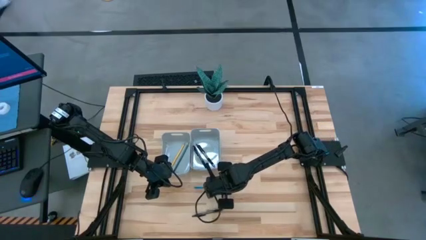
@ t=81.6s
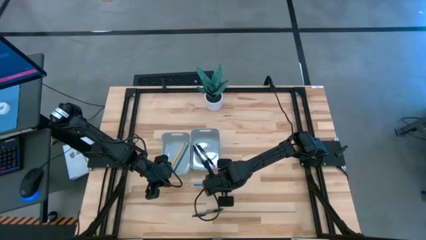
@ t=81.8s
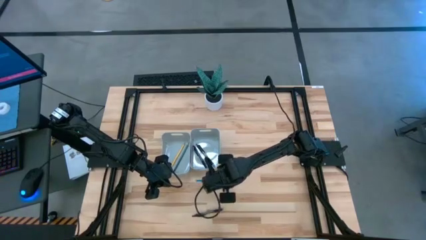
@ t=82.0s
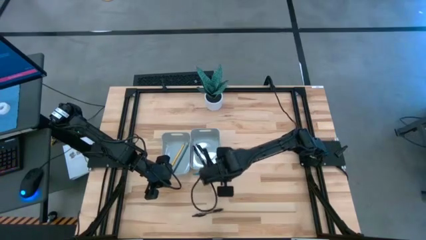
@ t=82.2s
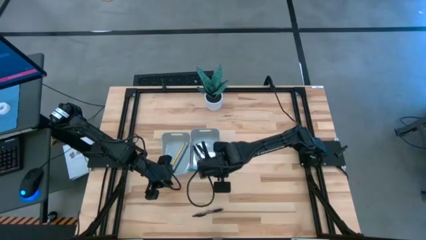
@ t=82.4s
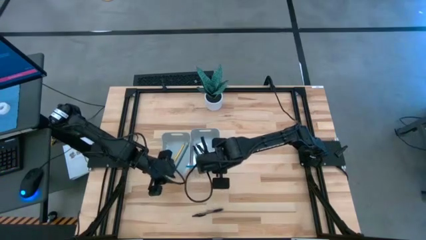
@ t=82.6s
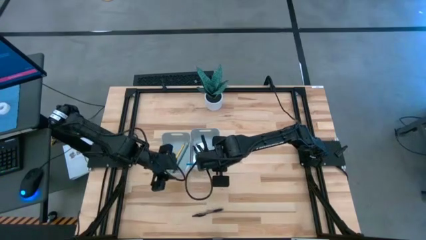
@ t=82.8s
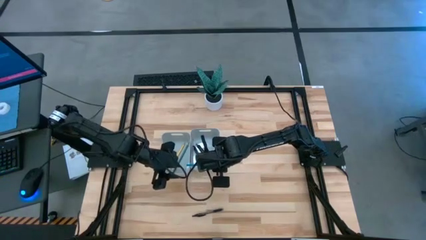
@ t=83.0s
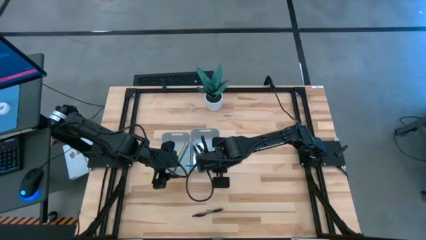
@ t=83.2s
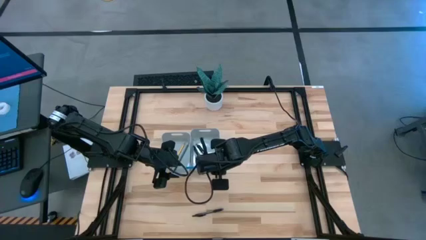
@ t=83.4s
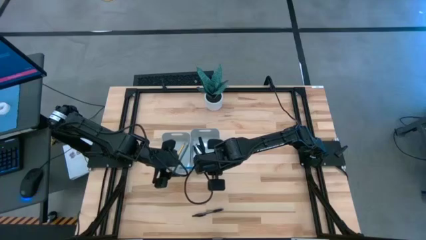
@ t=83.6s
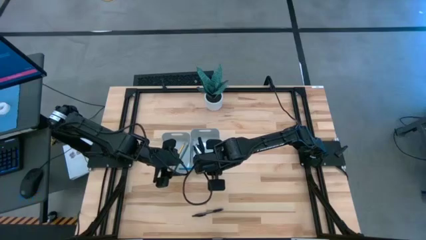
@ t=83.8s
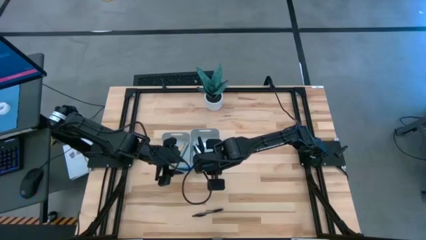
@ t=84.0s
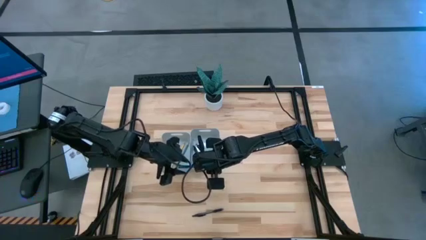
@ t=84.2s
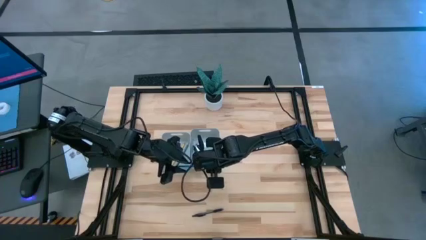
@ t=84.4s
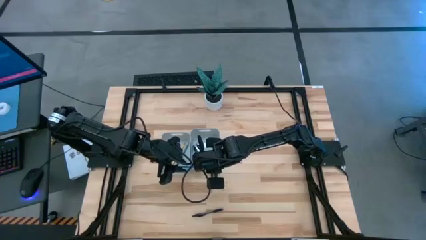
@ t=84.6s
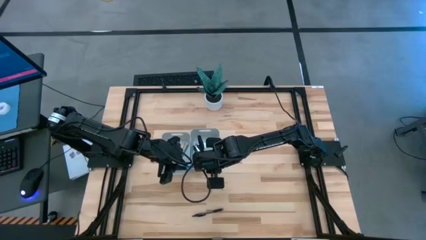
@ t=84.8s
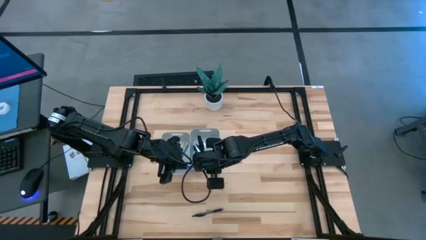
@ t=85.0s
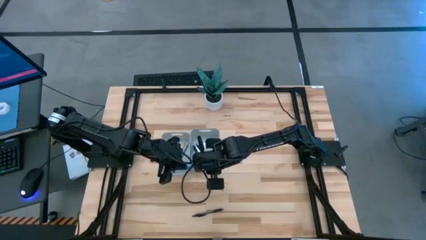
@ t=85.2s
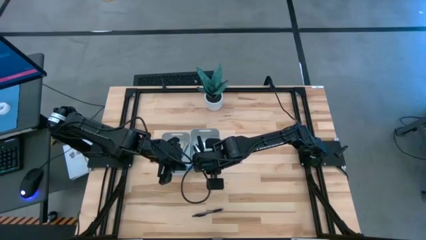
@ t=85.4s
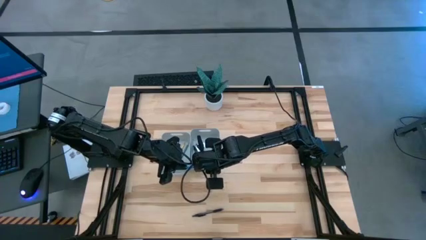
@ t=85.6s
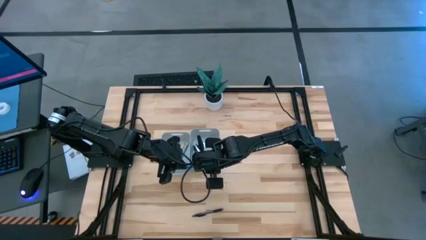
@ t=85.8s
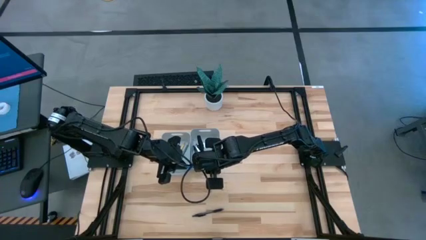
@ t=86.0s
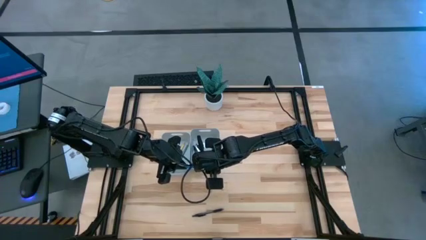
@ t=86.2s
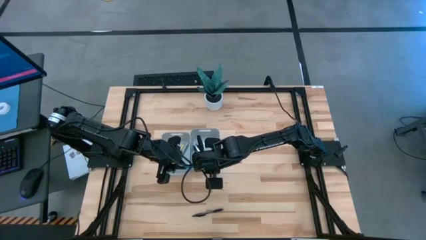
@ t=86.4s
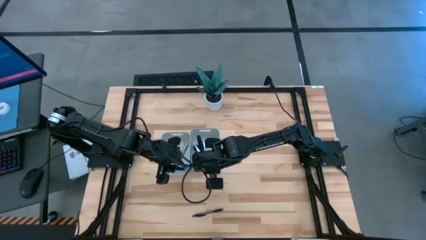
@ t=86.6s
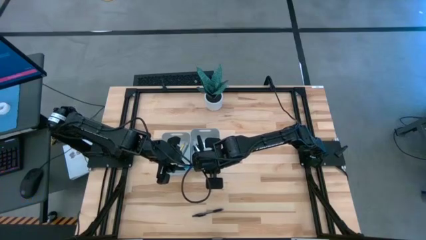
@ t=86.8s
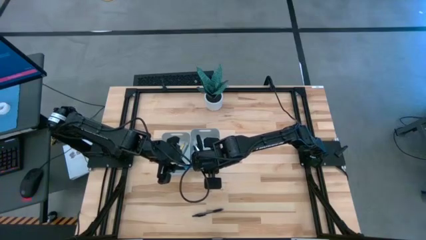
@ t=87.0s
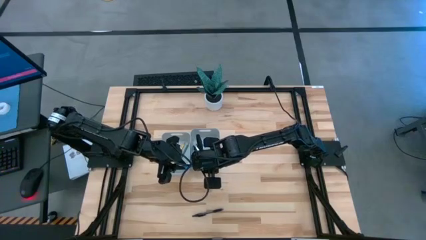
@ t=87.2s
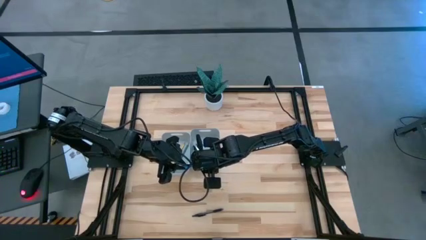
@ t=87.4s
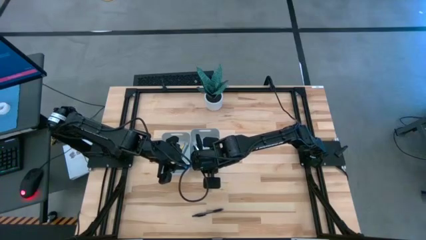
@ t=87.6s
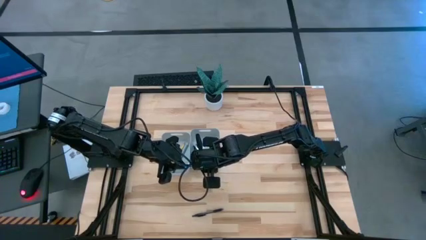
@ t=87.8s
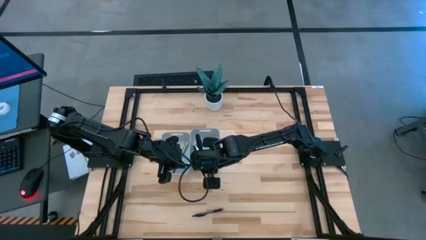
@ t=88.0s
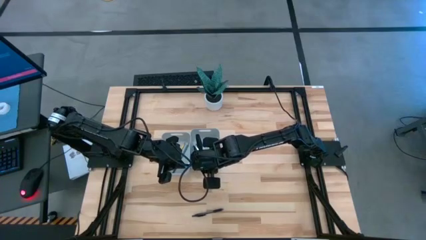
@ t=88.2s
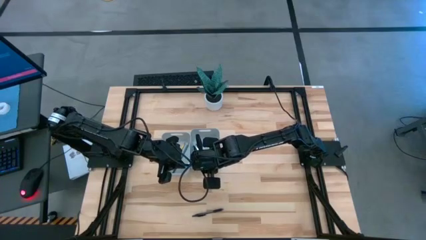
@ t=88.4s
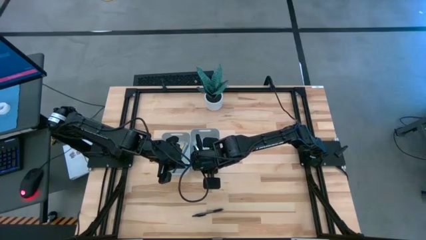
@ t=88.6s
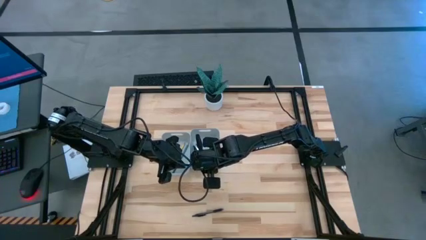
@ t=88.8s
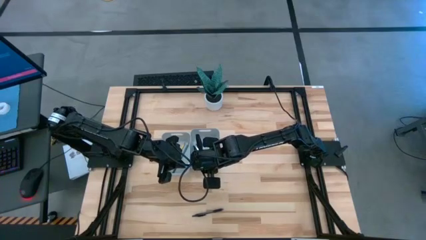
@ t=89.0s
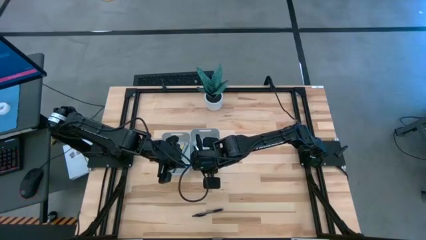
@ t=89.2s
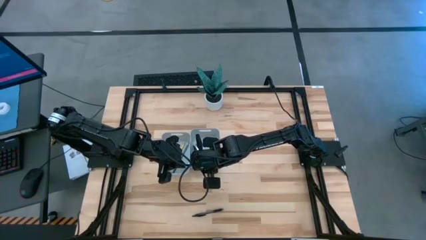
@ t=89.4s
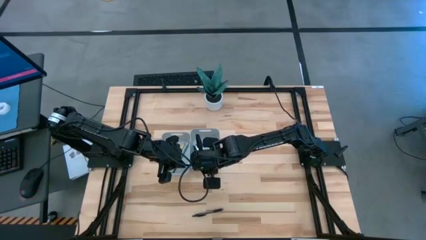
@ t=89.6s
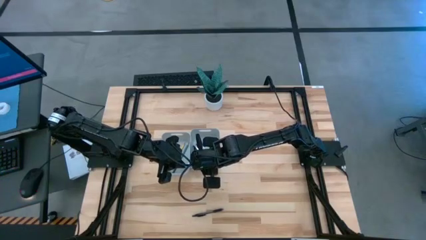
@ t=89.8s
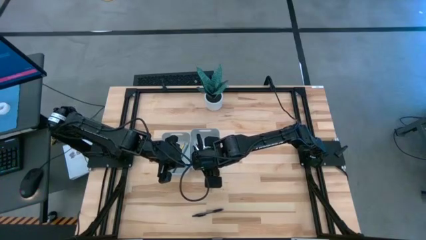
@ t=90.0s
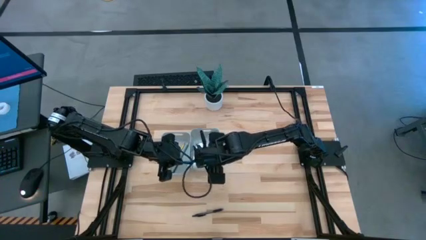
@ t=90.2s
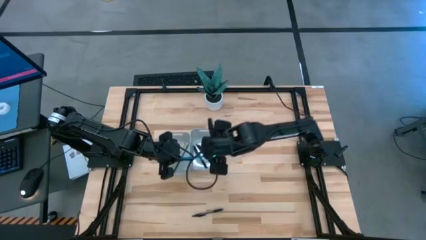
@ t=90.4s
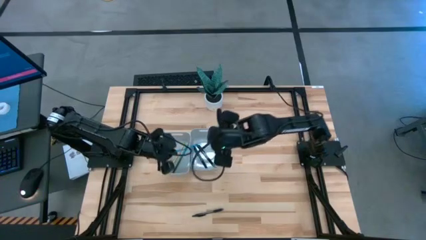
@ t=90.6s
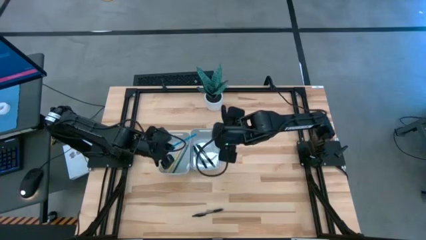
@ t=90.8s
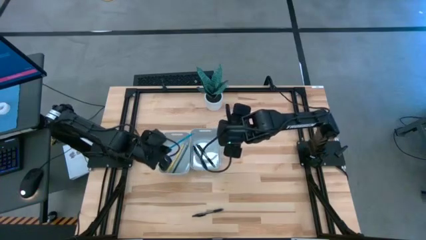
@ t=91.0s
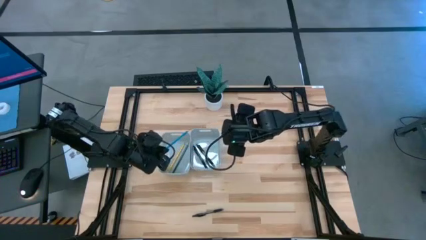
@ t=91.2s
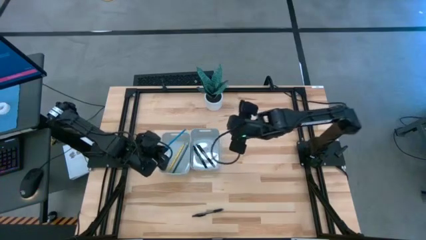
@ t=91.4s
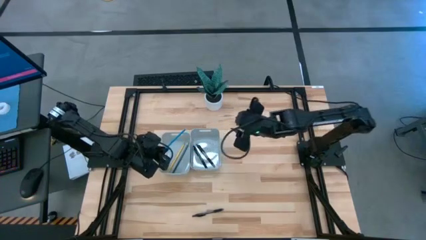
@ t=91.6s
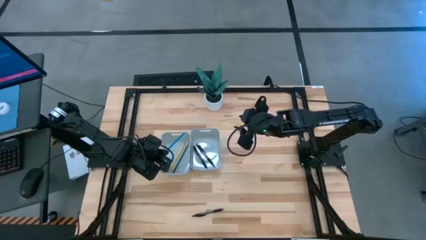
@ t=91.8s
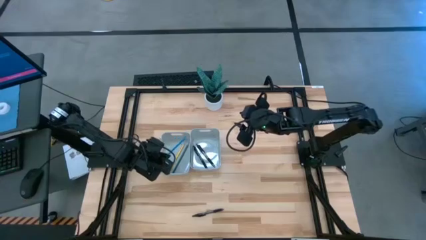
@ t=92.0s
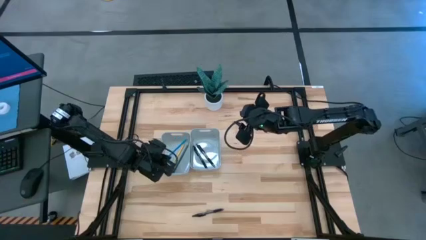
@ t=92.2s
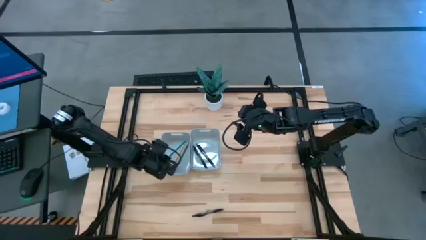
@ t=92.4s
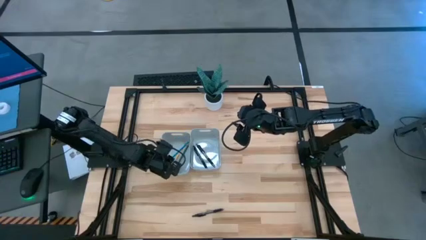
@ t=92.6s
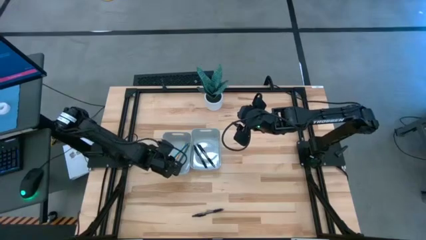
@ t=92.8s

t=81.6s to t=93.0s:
Task: Sort pens & pencils
Put the blue pencil into the left gray bin

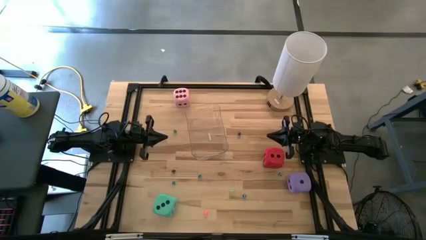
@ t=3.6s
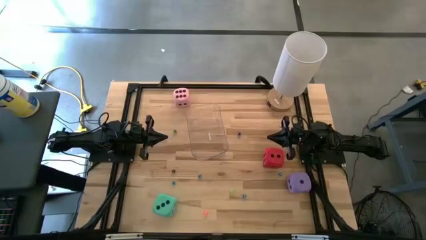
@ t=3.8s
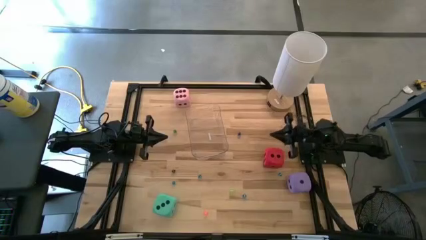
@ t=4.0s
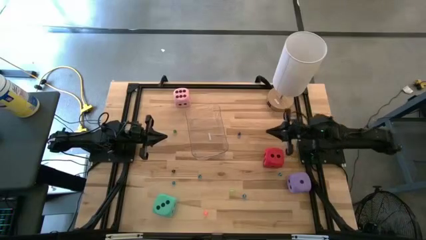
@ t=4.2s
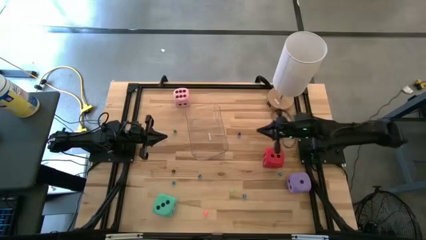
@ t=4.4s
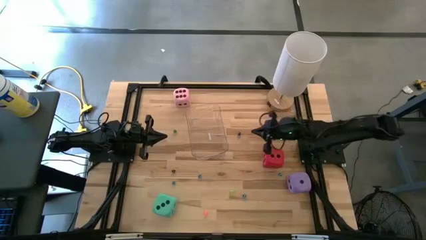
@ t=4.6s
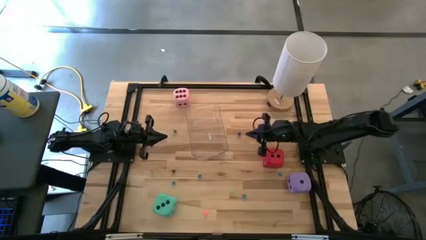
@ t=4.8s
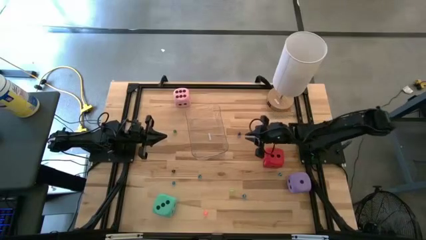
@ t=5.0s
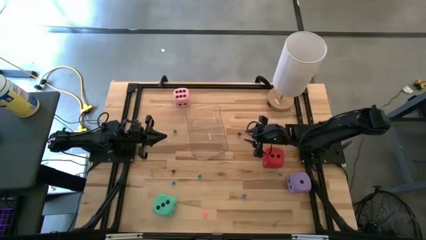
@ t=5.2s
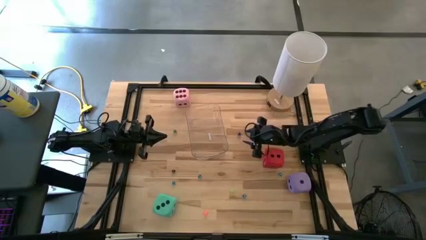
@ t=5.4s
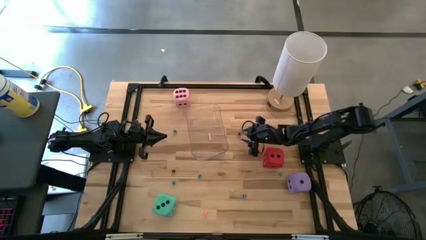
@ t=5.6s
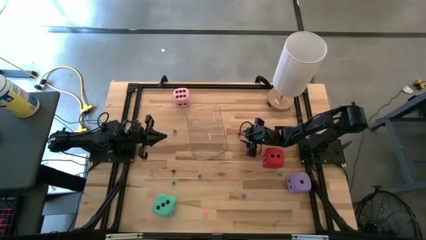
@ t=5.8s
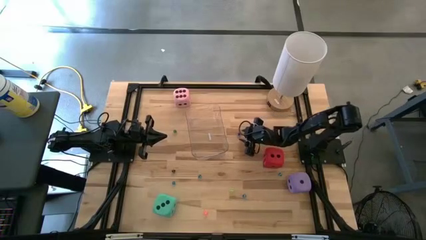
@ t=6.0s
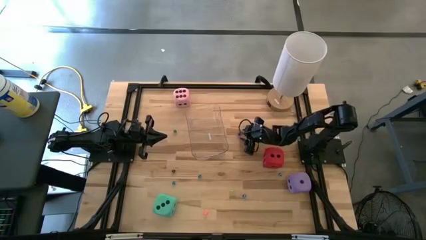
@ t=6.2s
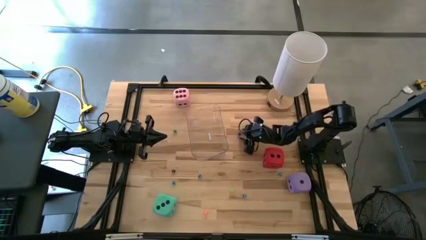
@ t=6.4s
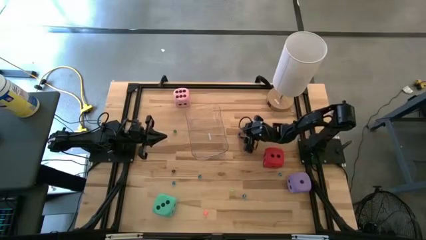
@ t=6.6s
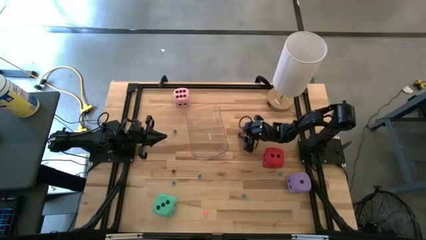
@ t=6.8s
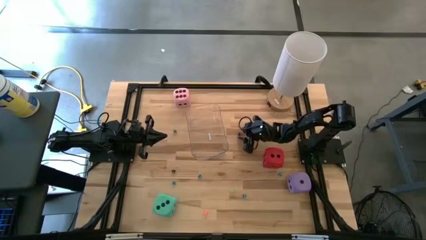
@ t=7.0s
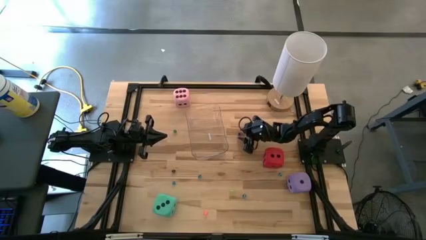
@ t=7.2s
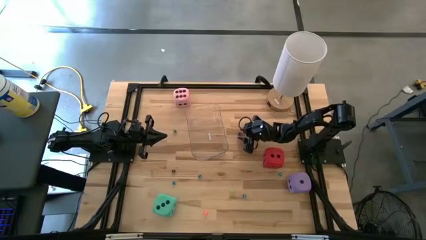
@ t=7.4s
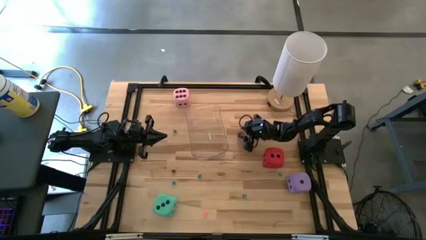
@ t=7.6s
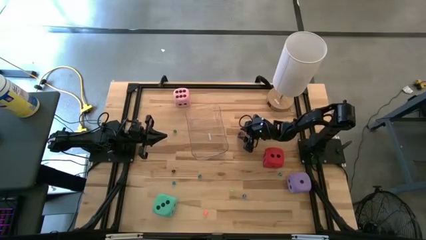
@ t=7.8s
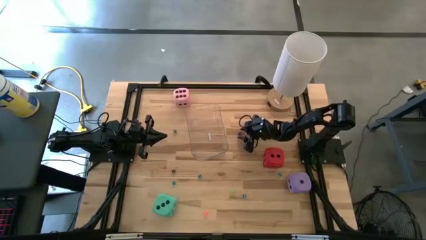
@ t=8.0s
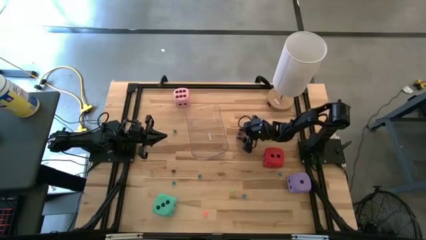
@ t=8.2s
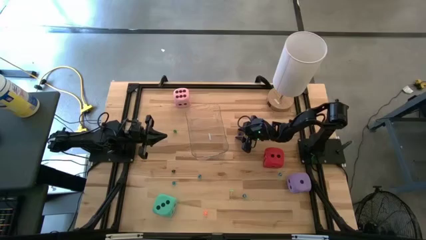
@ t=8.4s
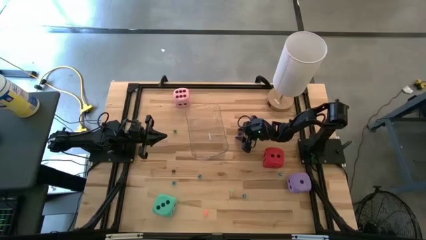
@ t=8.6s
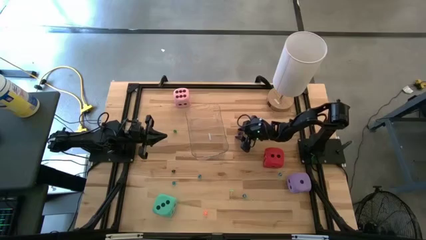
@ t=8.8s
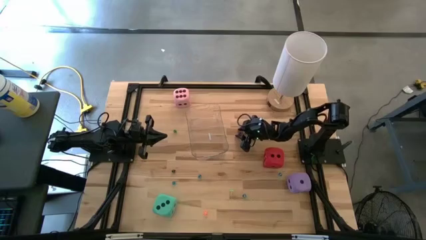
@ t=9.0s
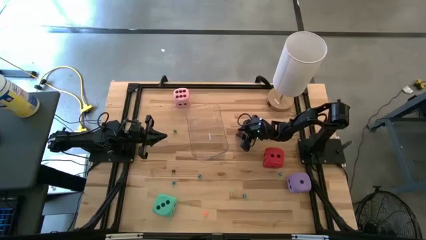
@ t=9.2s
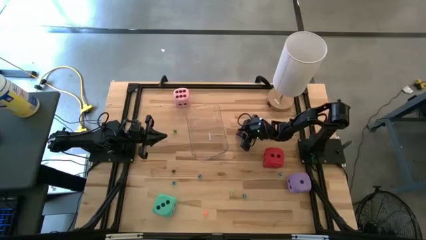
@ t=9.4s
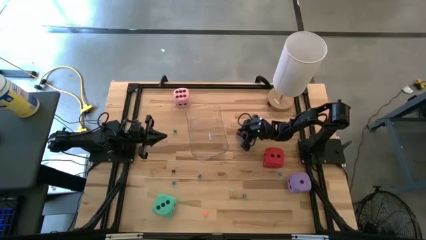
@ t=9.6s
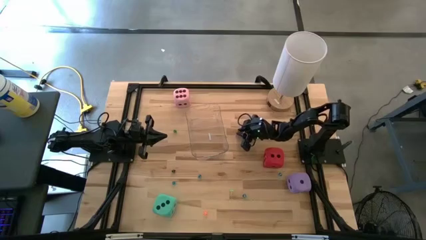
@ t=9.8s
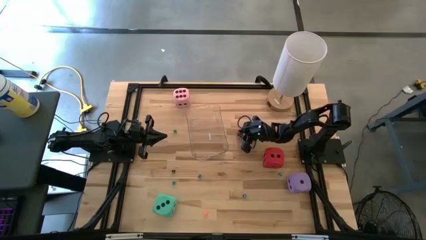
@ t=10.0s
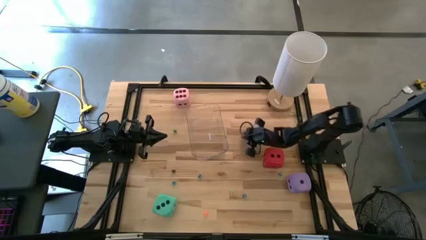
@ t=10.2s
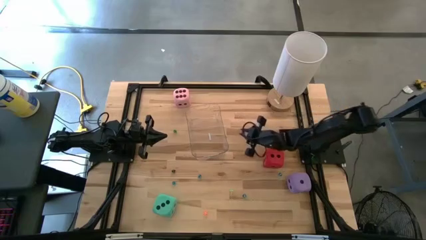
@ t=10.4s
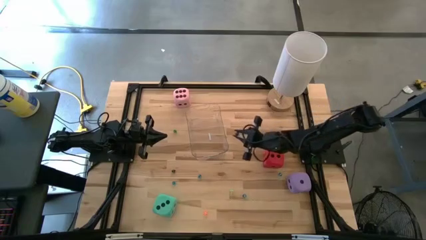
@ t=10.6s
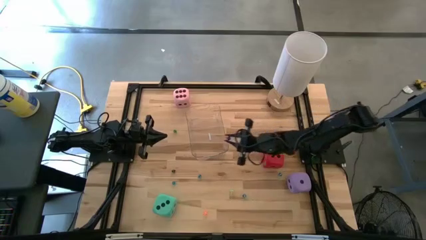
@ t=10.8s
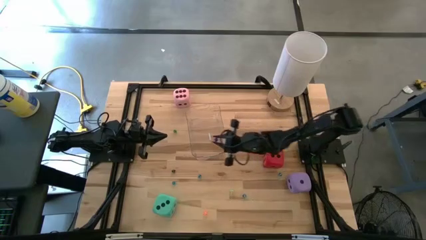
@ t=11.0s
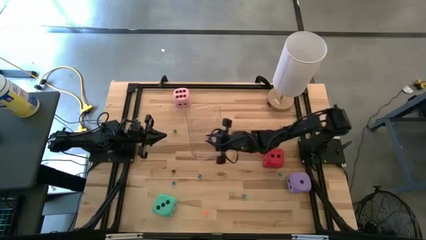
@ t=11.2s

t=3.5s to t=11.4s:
Task: Pick & Place Dice
Put the small blue die into the transparent bin
